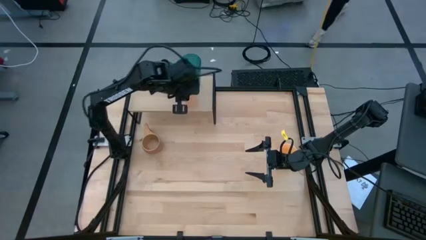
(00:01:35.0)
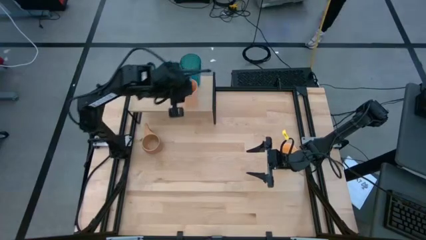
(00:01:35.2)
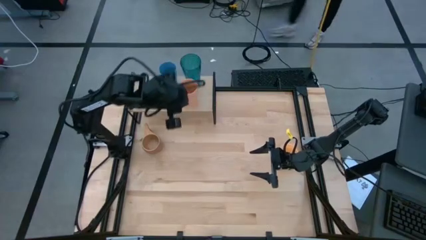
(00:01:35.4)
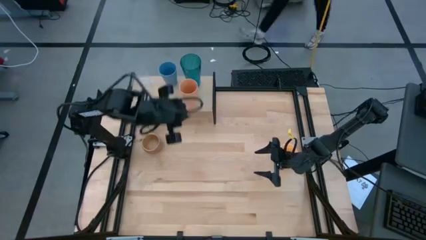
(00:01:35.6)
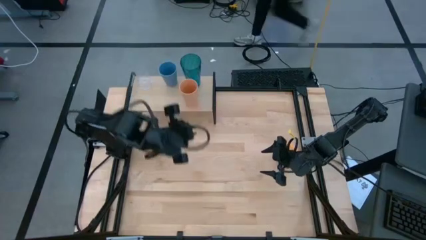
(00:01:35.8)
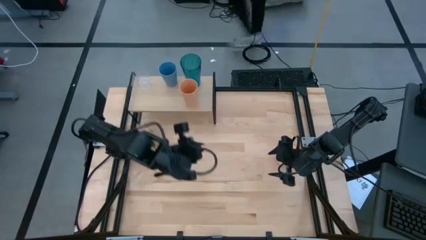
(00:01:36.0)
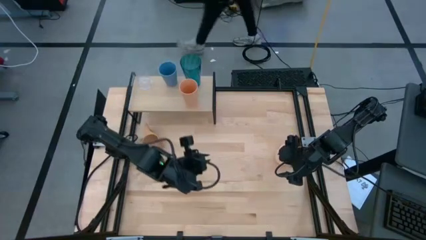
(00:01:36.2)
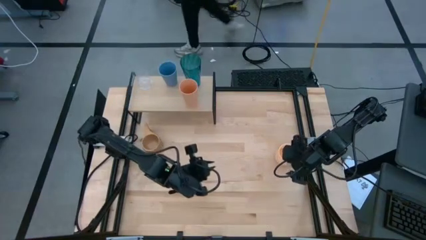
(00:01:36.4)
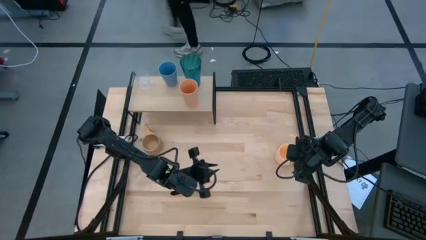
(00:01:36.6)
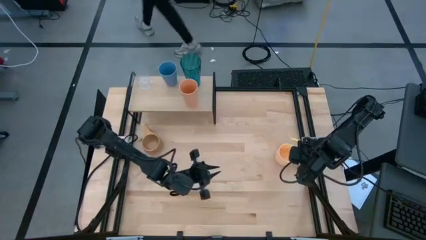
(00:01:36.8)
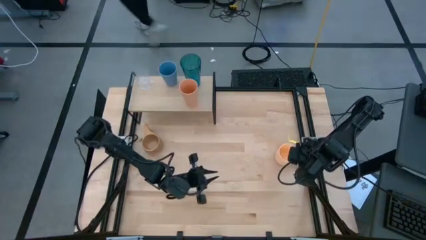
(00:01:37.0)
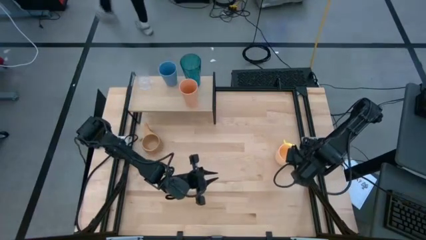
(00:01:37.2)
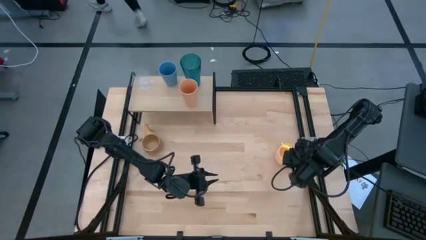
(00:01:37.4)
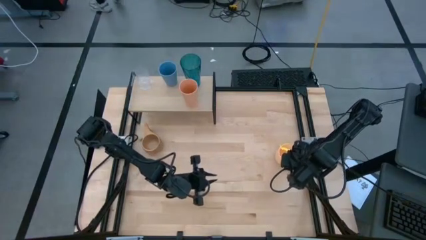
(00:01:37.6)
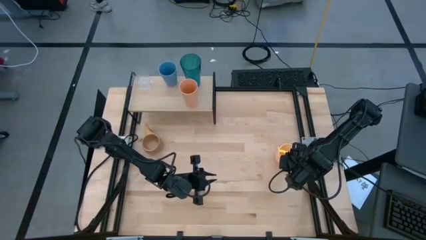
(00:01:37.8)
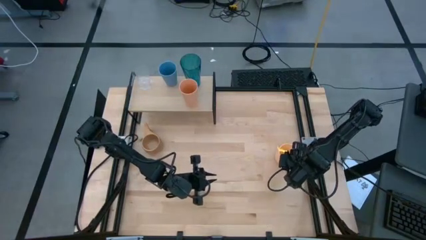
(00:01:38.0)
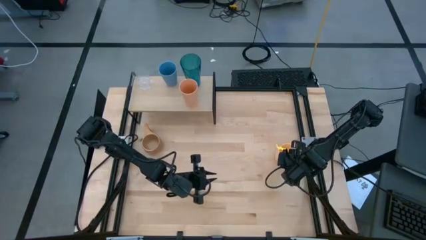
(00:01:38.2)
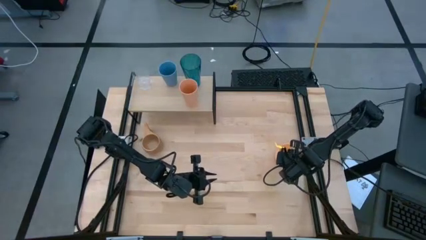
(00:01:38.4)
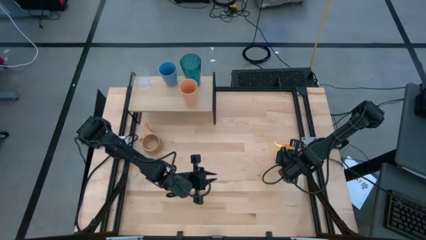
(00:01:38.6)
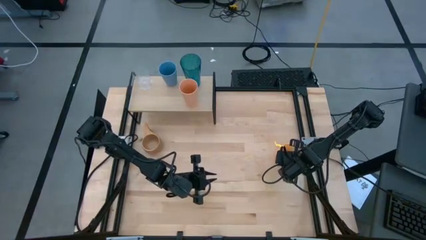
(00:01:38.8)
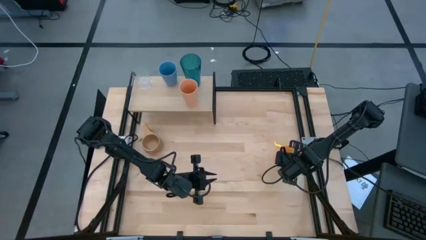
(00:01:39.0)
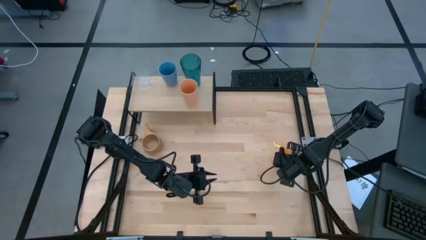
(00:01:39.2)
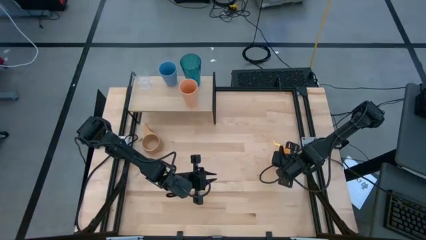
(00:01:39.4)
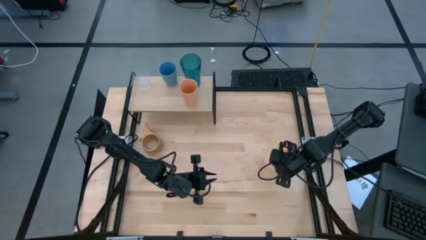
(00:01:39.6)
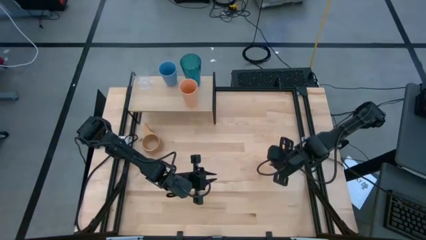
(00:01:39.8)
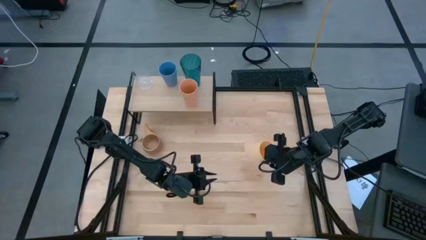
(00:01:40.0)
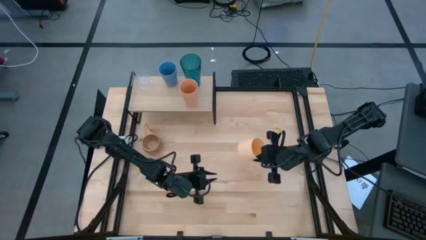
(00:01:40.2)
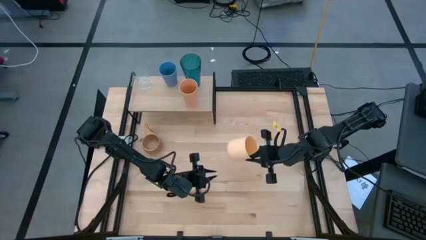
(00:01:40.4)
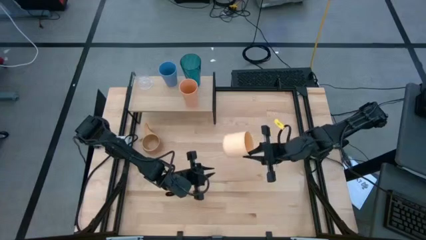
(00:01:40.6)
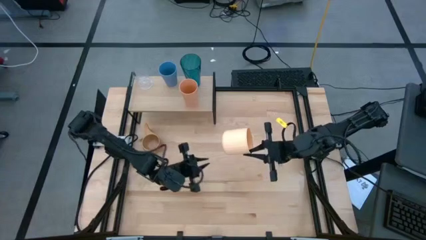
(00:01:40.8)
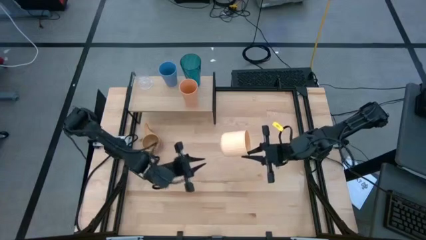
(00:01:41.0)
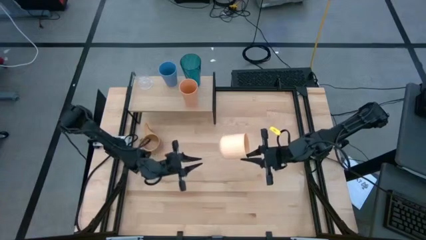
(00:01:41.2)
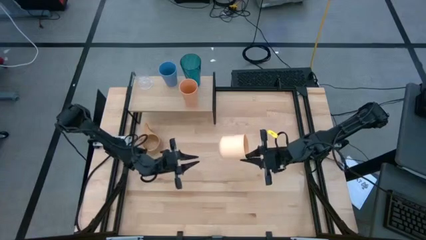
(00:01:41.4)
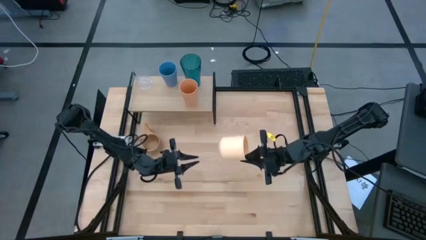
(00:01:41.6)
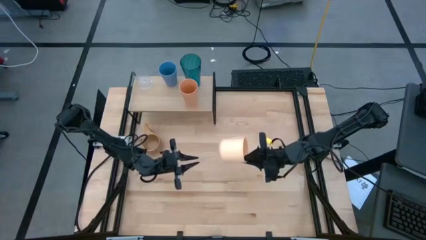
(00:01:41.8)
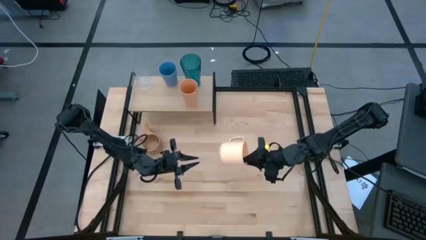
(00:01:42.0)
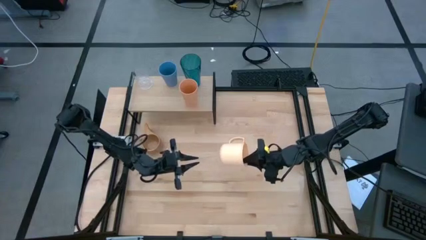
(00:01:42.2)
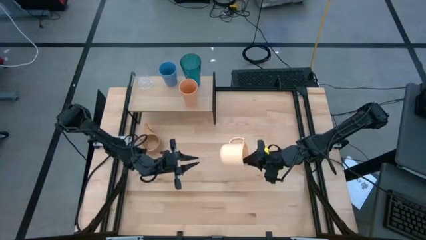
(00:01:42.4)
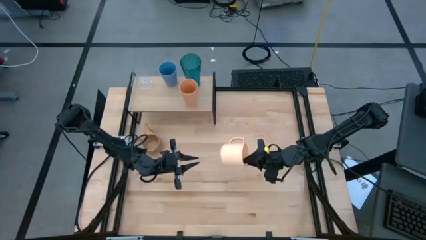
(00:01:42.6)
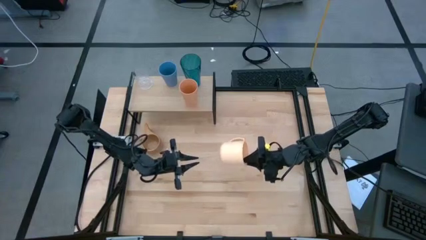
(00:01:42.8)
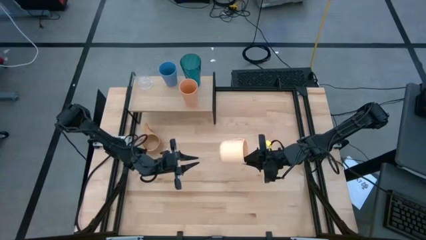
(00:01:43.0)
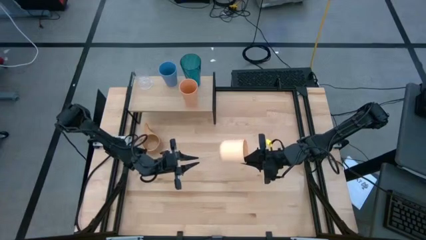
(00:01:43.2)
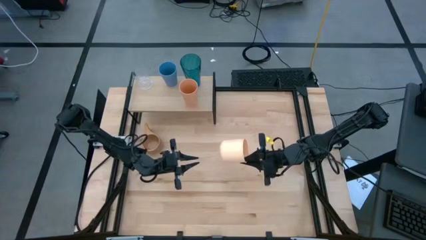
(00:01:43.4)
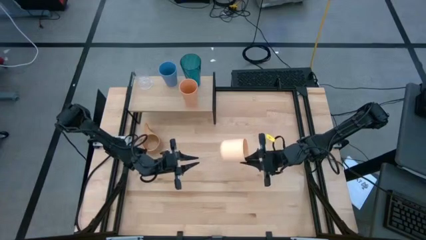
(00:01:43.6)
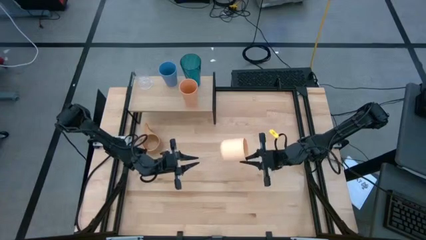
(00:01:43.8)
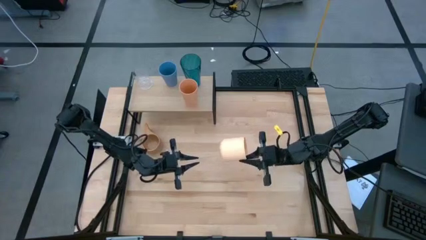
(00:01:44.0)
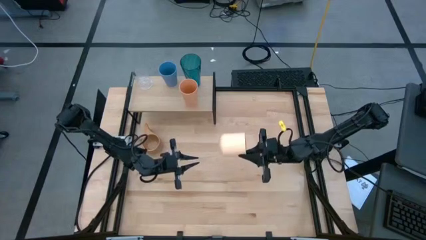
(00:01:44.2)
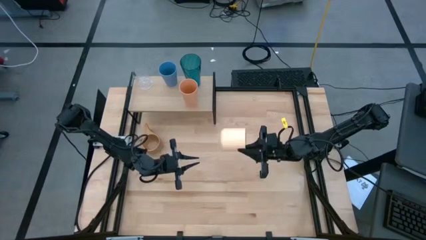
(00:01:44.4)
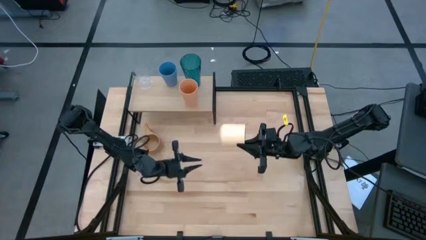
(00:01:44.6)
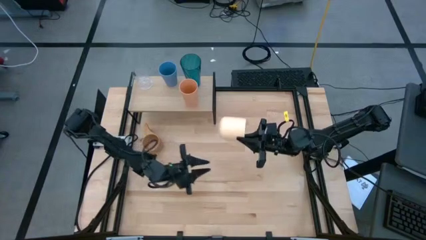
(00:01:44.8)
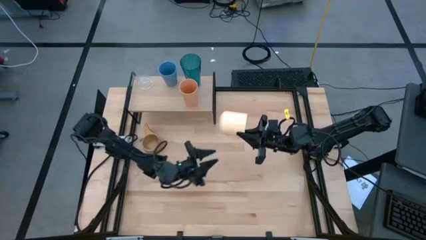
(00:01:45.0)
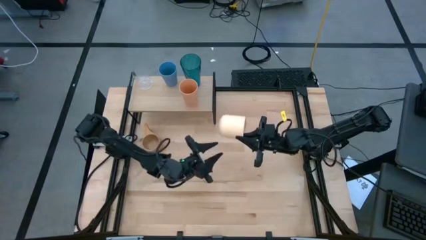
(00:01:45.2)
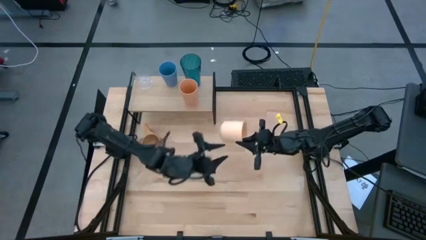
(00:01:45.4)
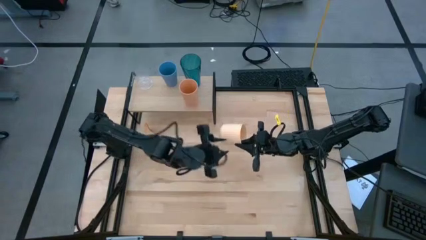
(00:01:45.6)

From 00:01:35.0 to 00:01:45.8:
Task: Stack small to large cups/mugs on shelf
Put the orange mug on the shelf

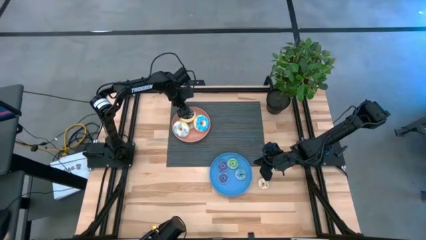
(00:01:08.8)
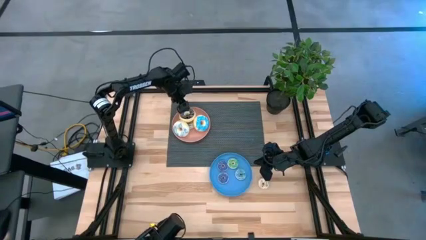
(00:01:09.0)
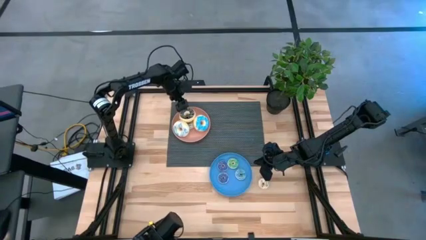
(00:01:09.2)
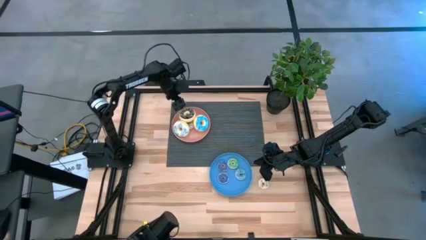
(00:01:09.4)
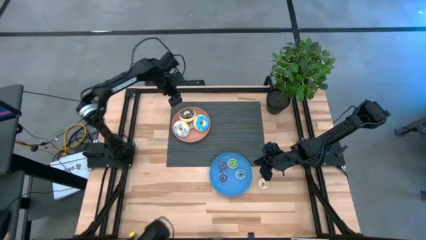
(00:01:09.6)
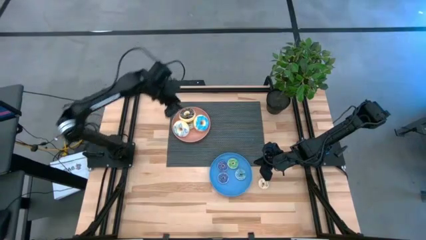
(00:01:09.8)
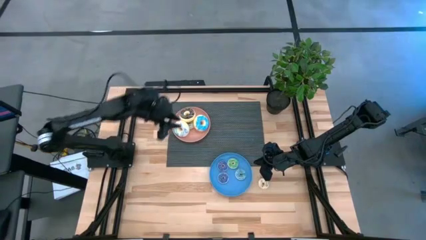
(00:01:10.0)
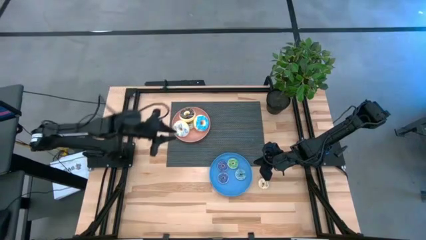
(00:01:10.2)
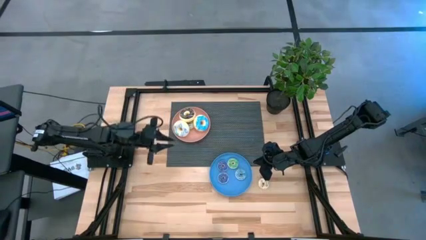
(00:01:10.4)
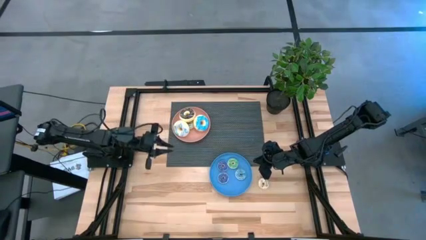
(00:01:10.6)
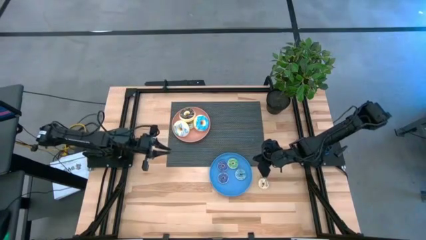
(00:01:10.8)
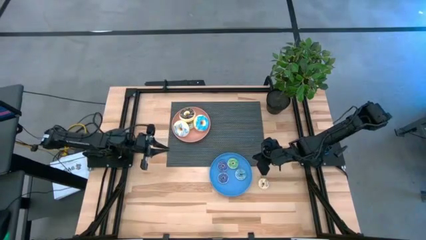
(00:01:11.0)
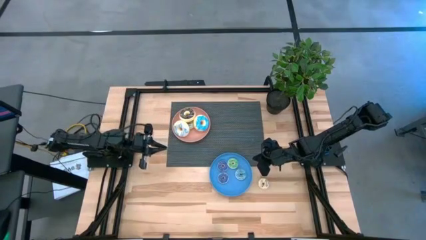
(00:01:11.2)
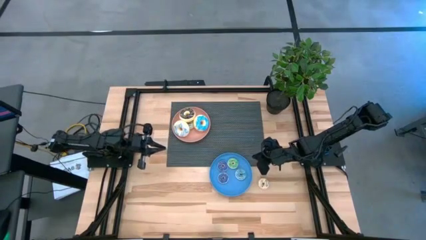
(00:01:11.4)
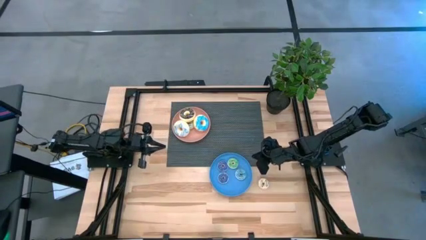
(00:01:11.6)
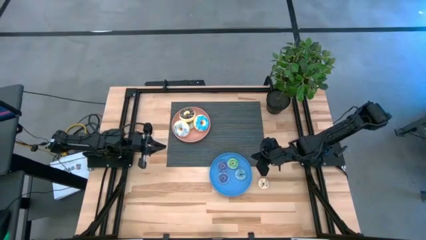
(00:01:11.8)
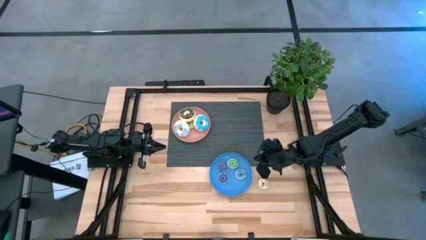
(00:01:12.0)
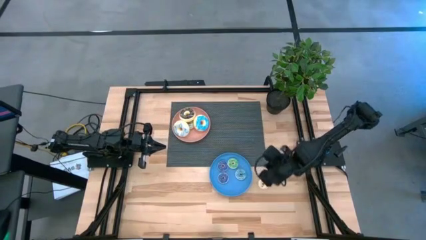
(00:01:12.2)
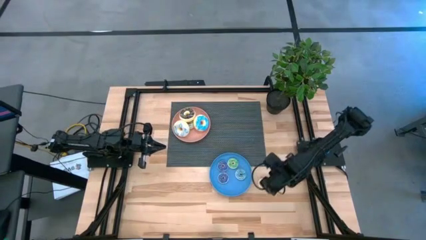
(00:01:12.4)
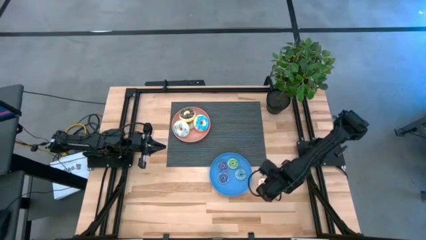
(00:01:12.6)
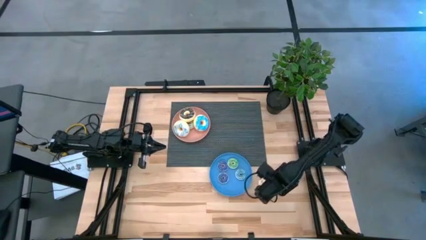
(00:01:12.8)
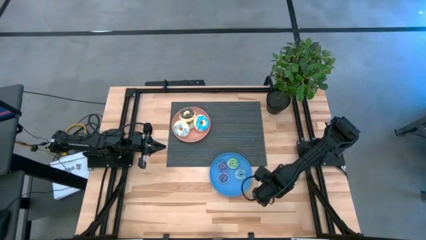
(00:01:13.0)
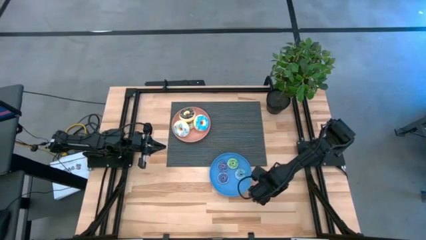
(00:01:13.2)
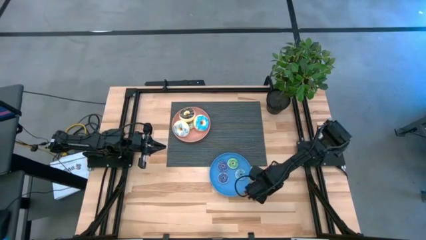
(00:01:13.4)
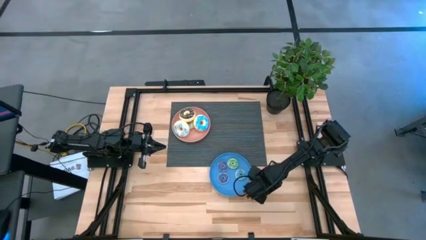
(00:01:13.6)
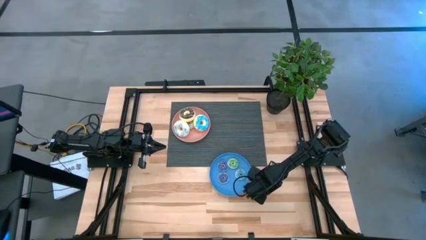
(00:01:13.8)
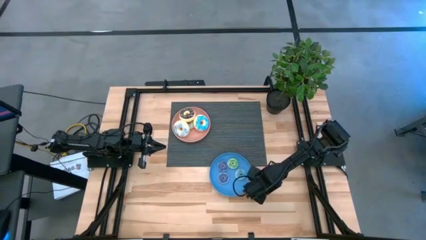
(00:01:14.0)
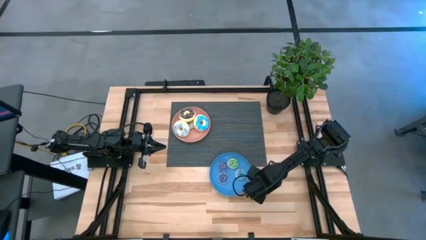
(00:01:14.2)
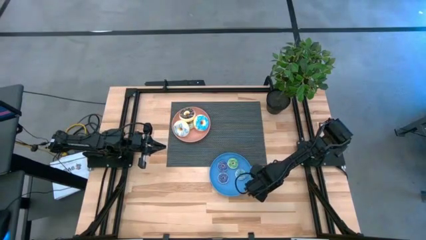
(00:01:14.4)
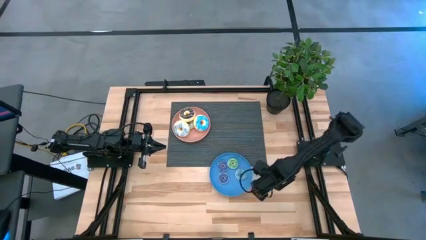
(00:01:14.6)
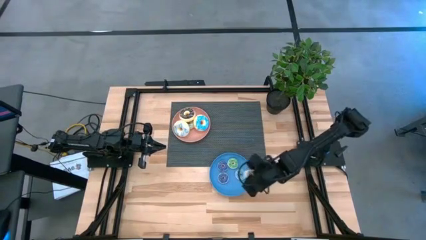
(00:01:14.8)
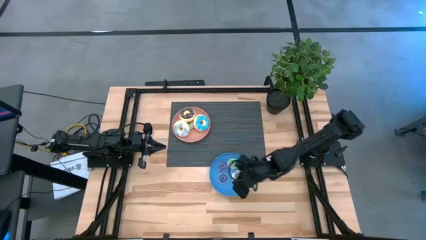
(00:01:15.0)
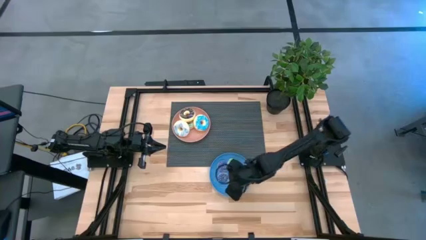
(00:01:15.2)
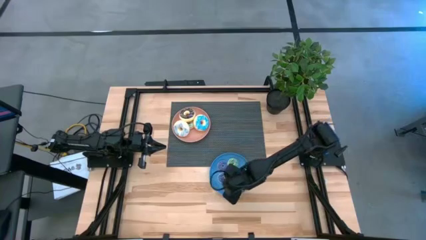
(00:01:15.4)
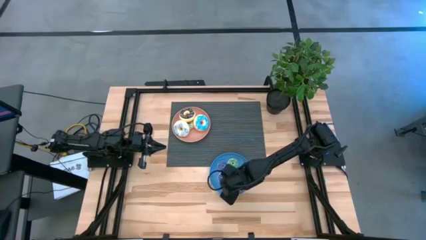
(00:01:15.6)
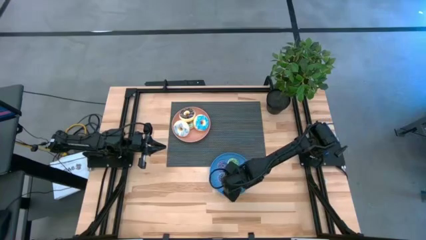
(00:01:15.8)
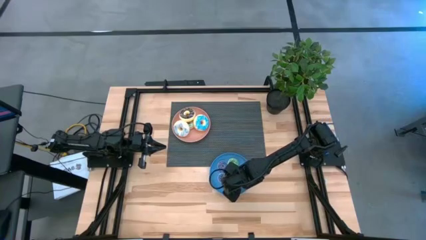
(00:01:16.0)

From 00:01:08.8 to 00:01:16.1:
Task: Pick & Place donuts
Put the small white donut into the blue plate
